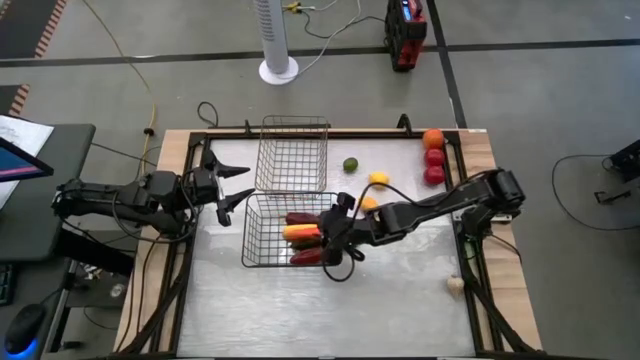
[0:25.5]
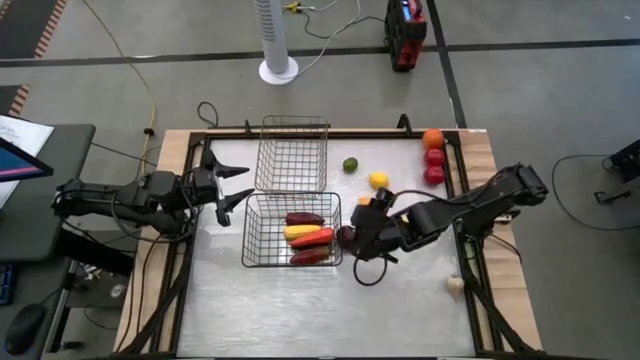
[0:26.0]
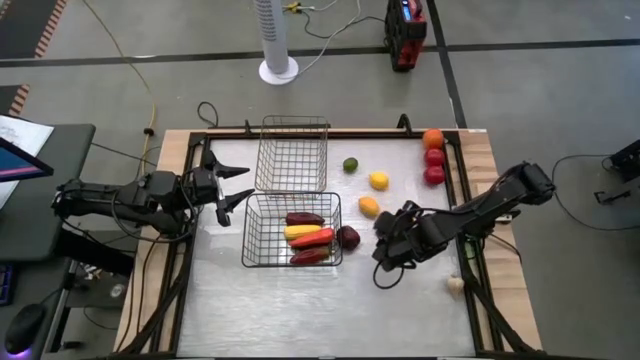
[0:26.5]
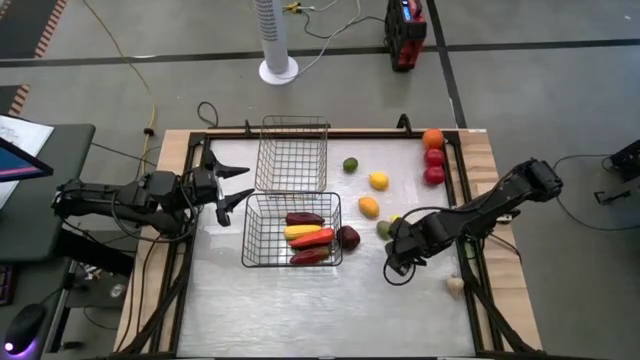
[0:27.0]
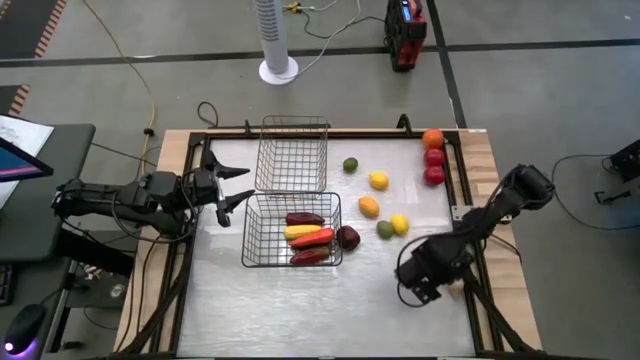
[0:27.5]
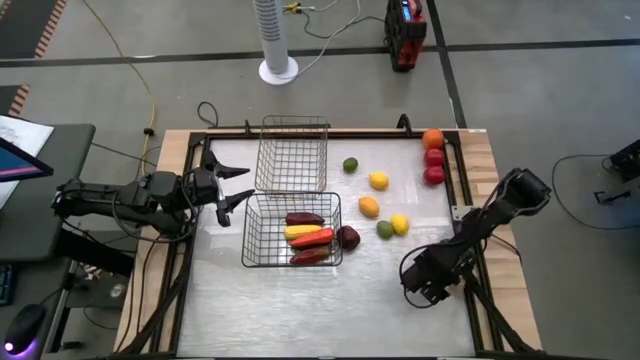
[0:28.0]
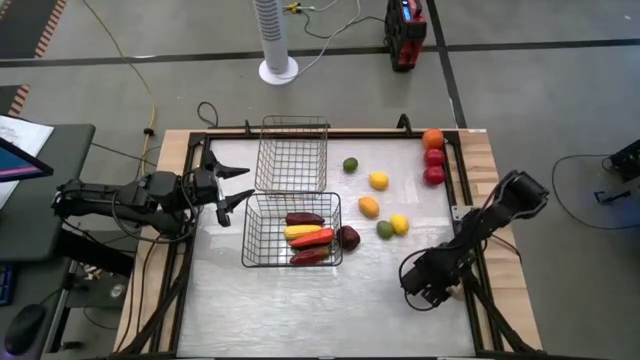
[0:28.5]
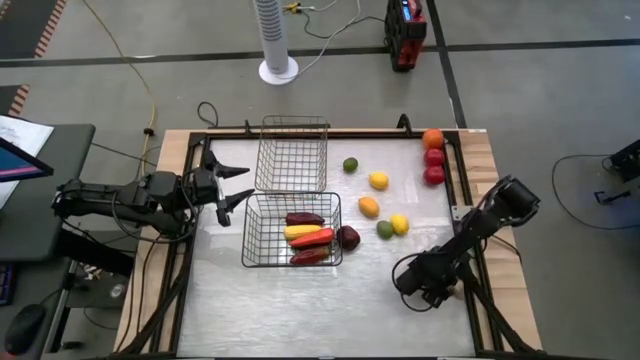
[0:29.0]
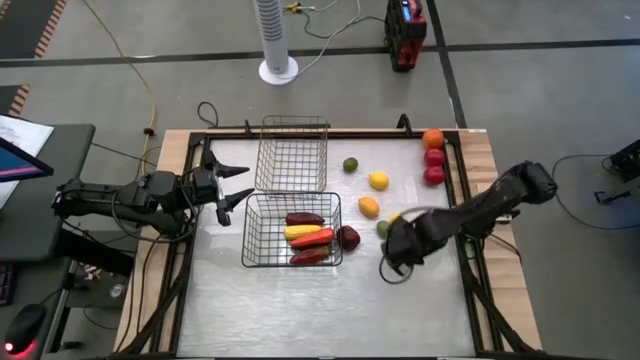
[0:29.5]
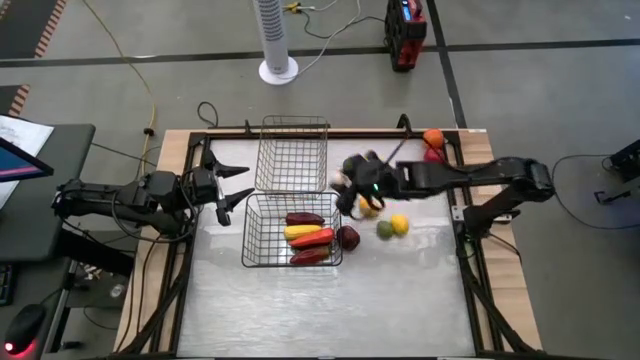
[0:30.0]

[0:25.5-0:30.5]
Task: Sort produce into baskets
Put the garlic into the gold wire basket

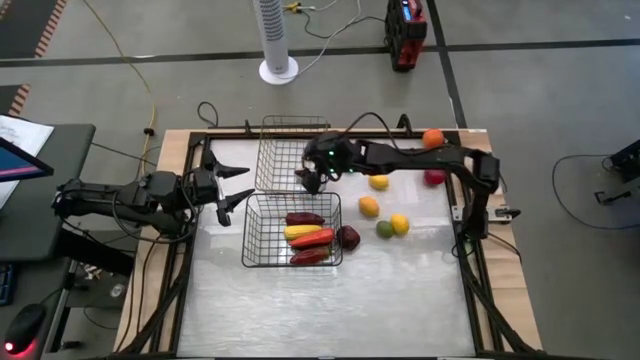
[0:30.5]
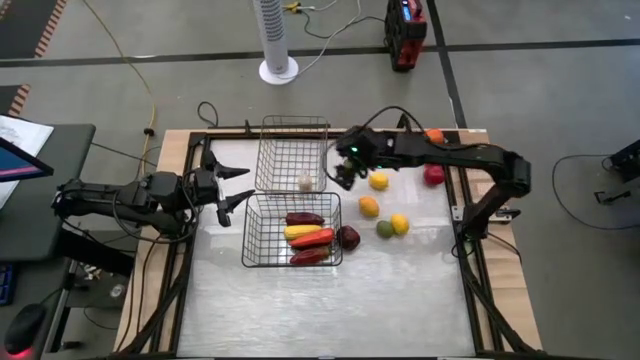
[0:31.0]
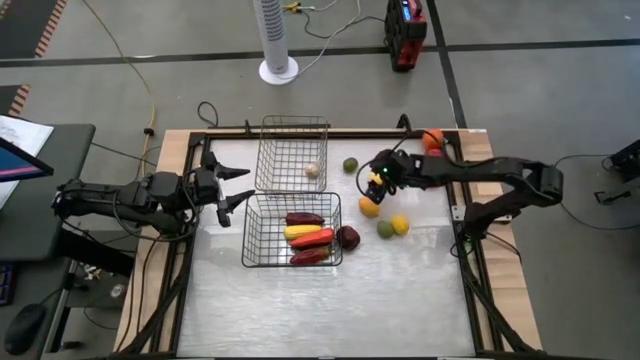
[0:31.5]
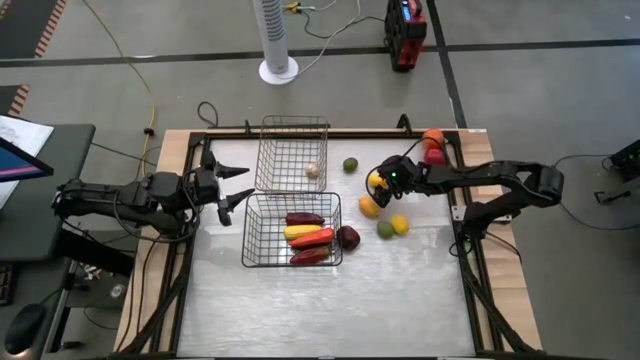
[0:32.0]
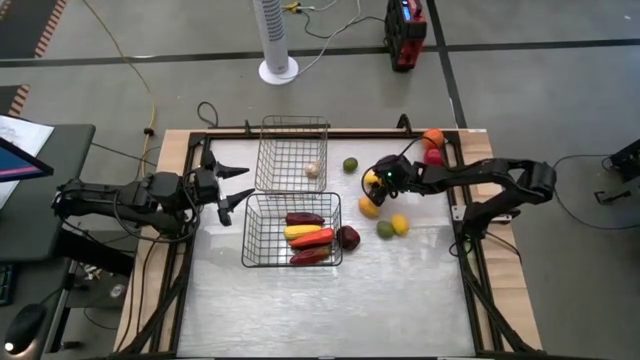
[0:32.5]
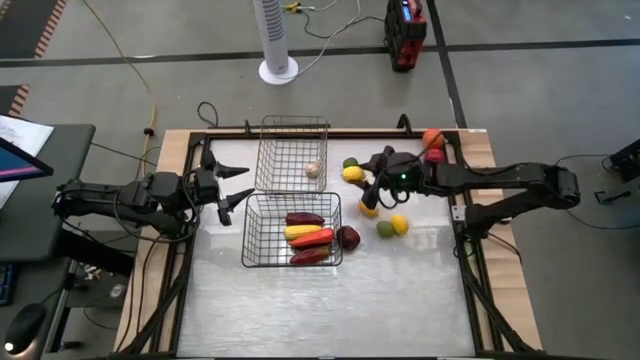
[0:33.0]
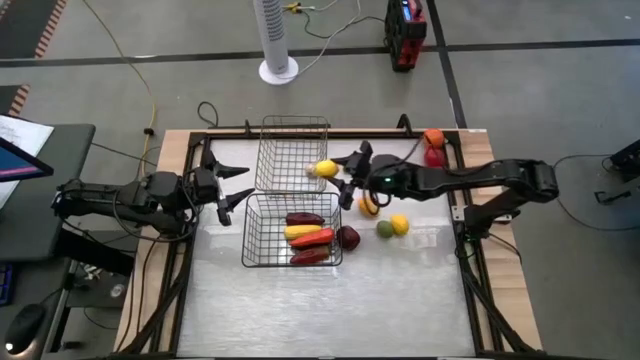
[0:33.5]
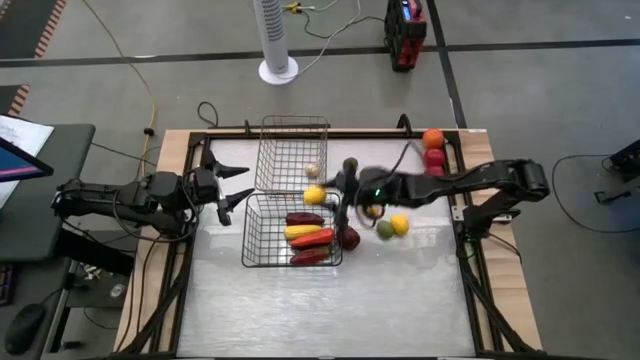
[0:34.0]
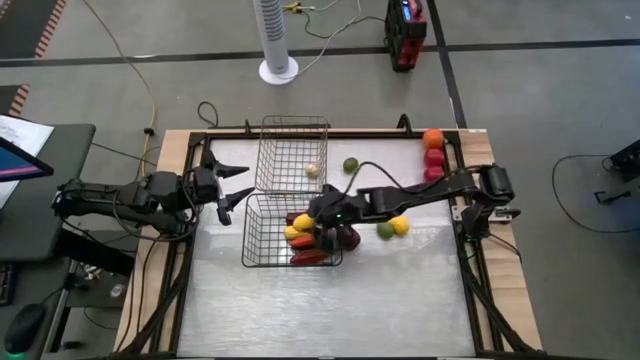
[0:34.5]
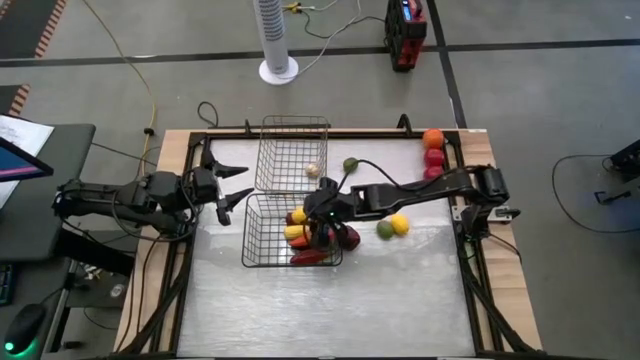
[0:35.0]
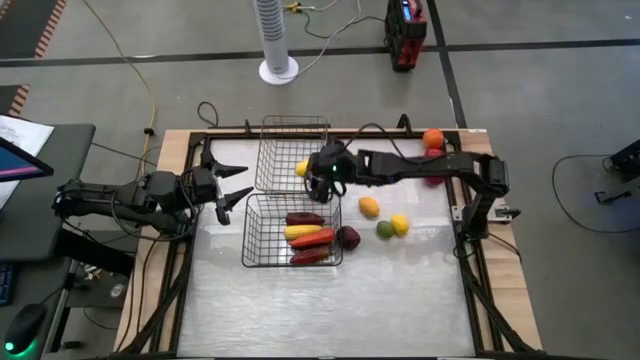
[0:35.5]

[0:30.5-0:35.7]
Put the top lemon into the gold wire basket

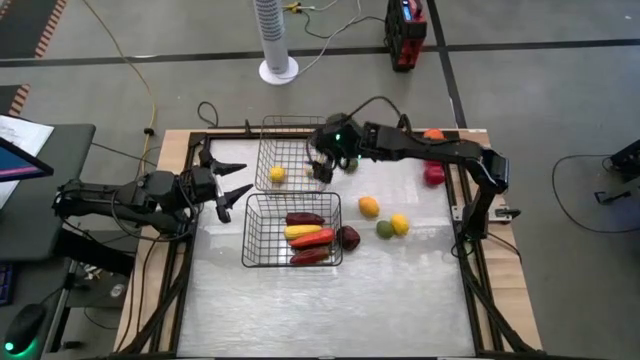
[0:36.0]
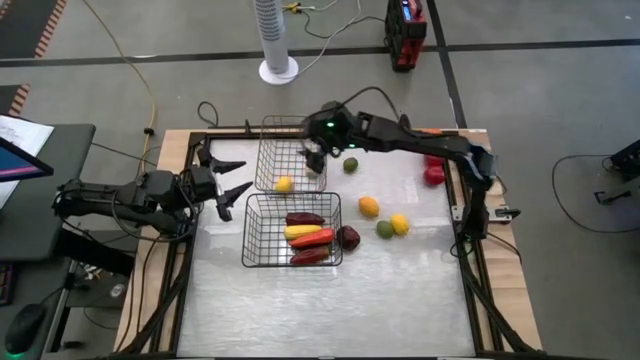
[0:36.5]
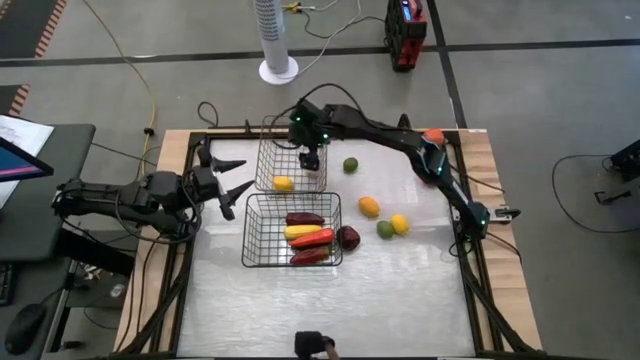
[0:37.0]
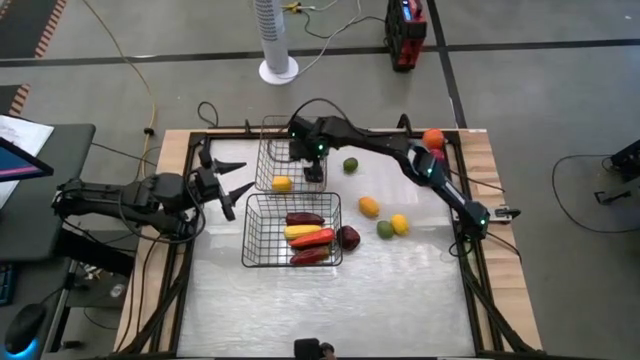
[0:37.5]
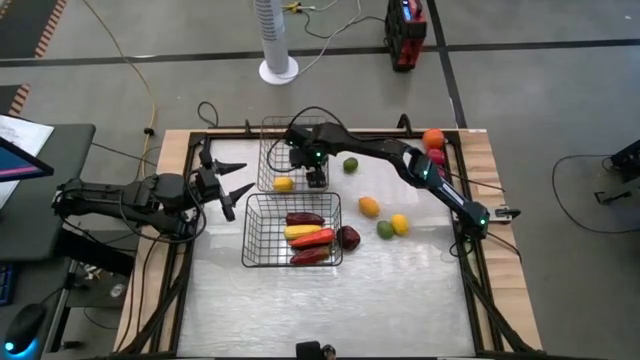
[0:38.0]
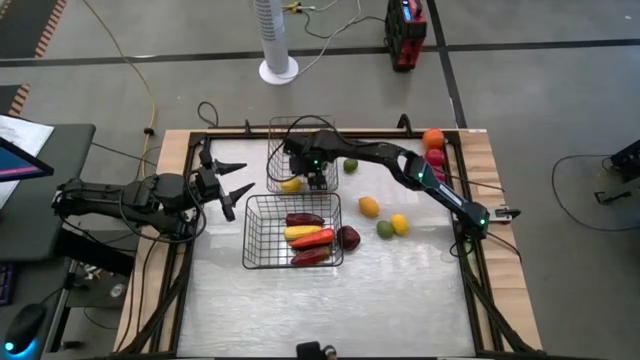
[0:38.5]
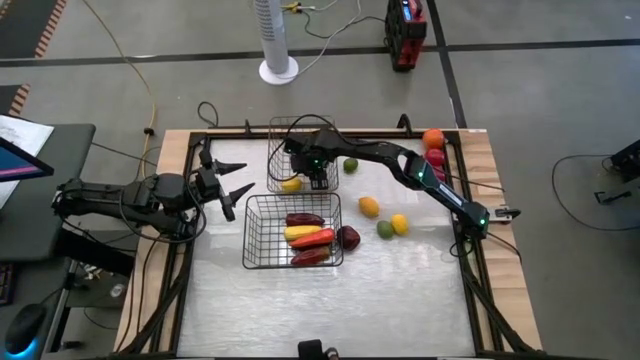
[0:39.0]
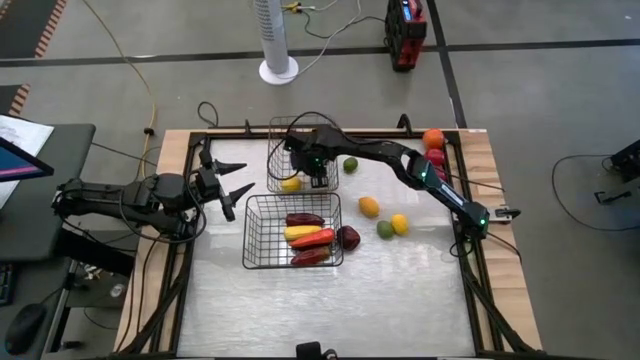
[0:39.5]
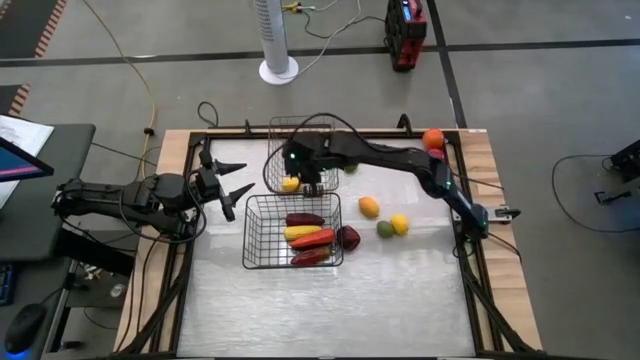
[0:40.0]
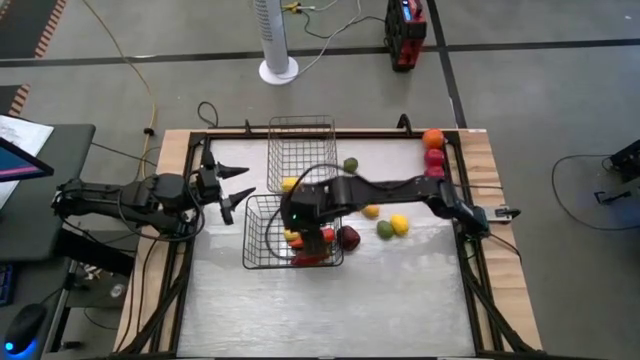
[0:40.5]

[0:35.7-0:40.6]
Put the garlic from the gold wire basket to the black wire basket

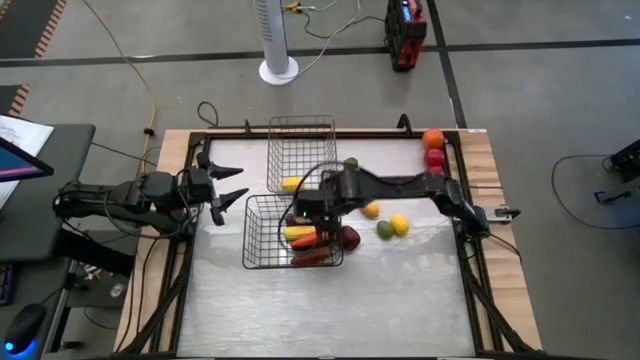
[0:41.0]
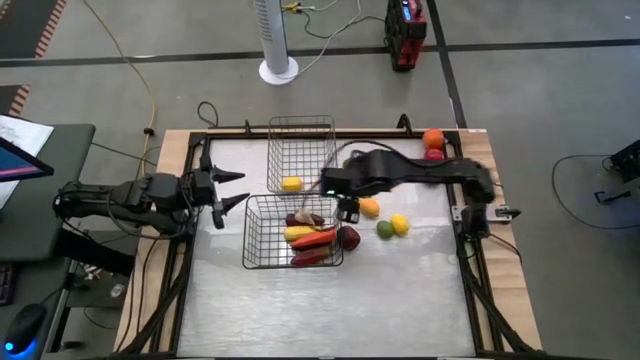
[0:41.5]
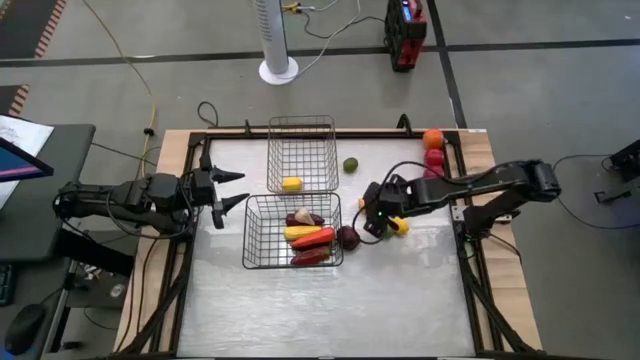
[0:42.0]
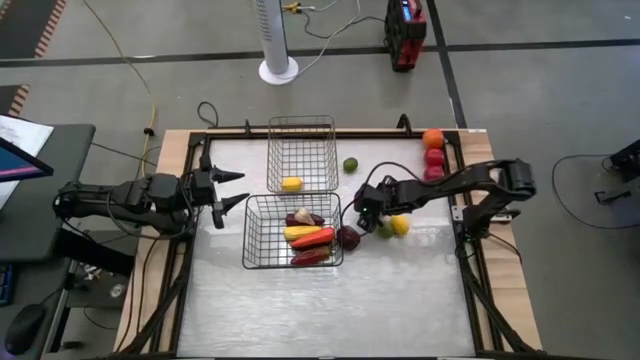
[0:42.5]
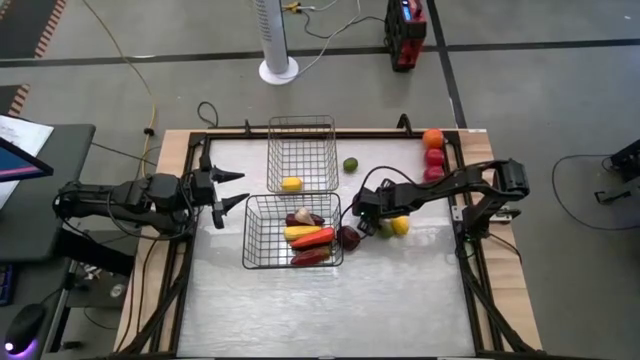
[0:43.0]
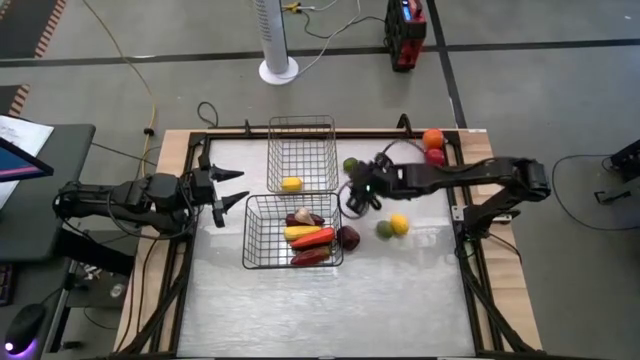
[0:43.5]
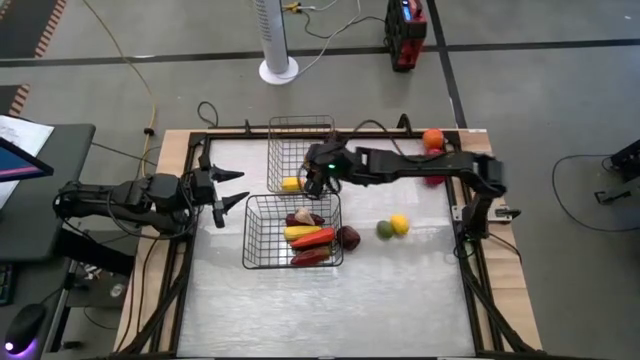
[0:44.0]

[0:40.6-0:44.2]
Put the top lemon into the gold wire basket

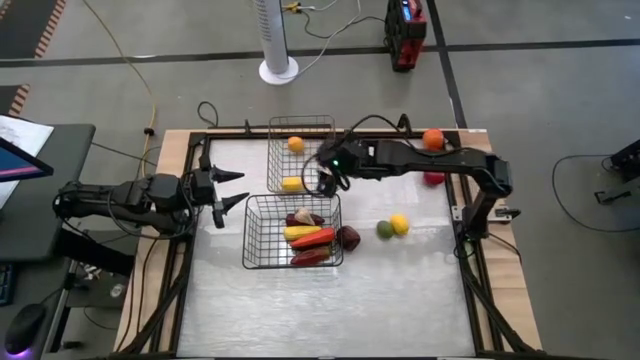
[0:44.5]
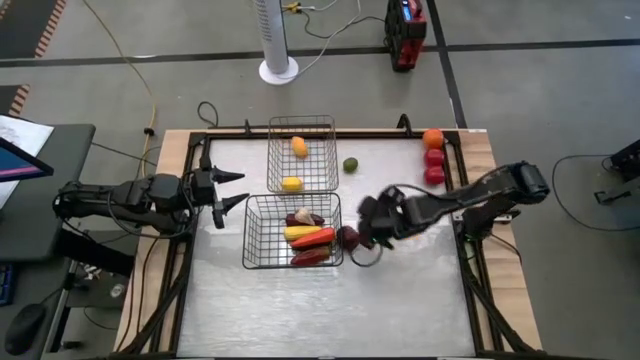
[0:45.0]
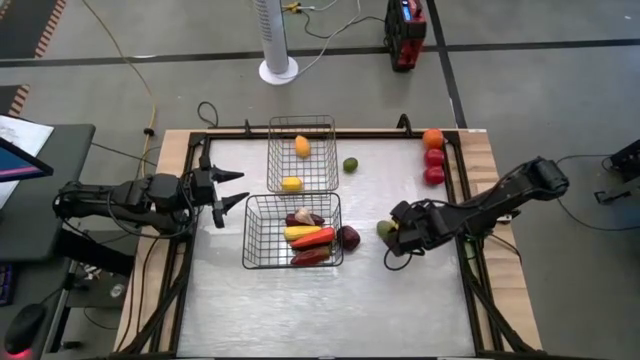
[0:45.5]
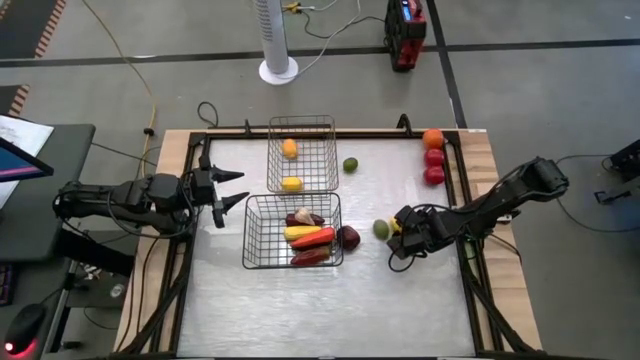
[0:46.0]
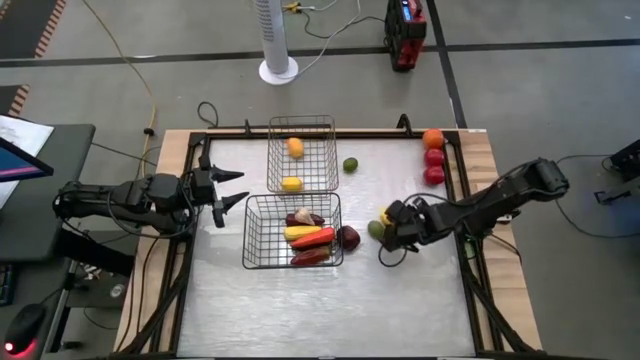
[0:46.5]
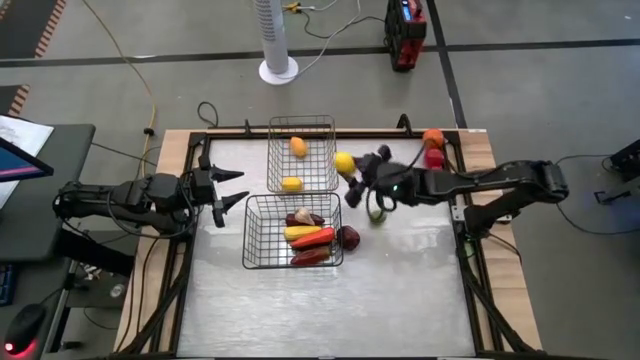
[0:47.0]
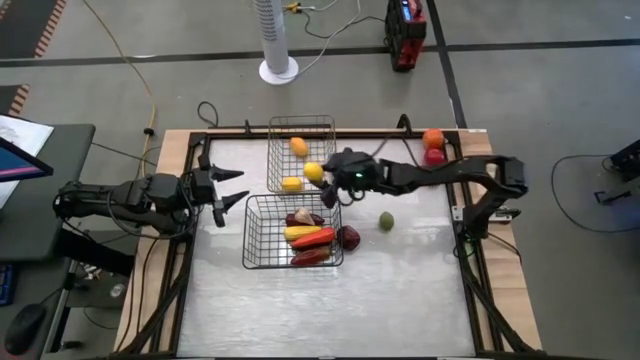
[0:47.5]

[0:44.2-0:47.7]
Put the lemon into the gold wire basket
